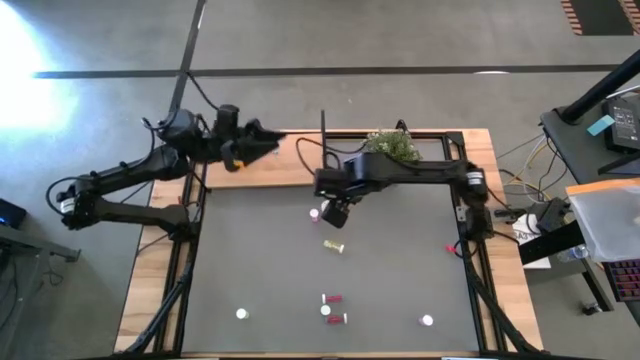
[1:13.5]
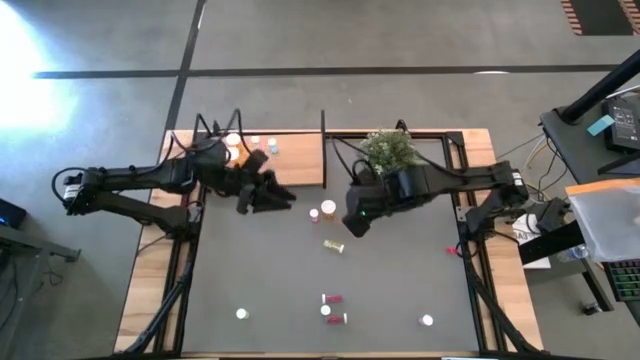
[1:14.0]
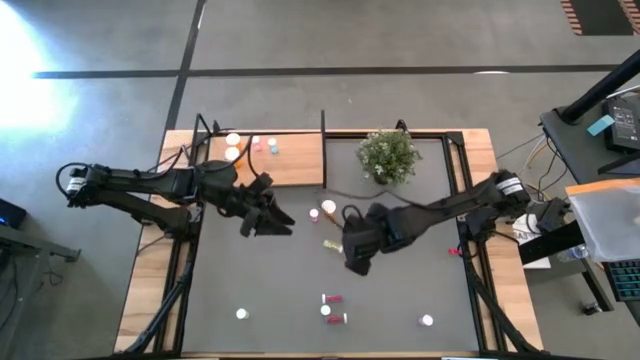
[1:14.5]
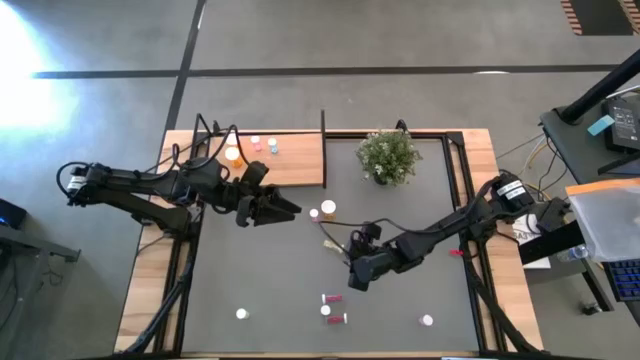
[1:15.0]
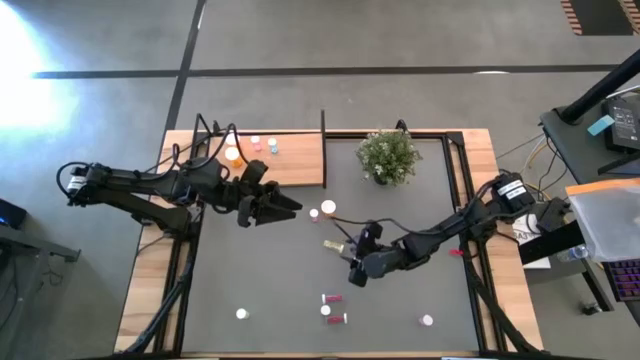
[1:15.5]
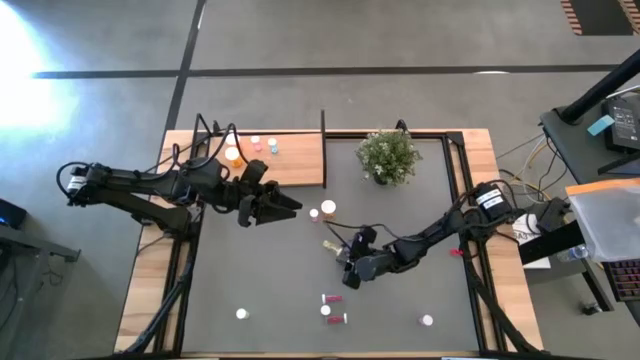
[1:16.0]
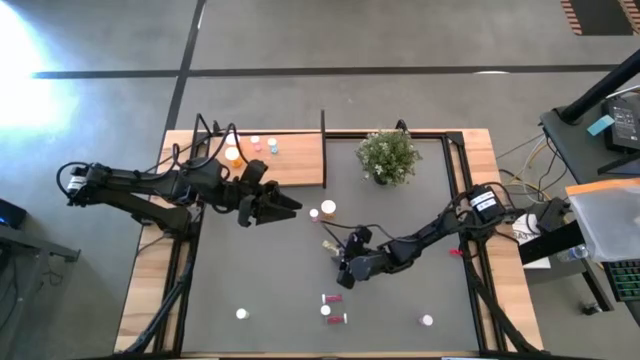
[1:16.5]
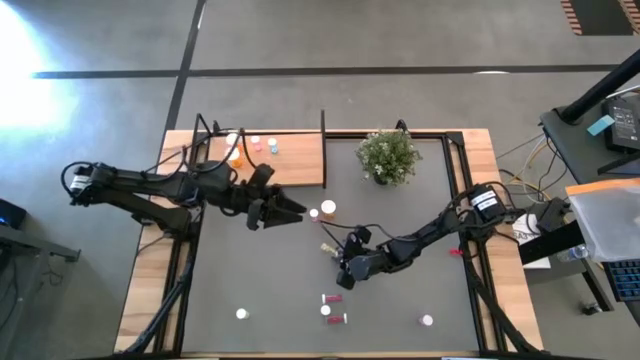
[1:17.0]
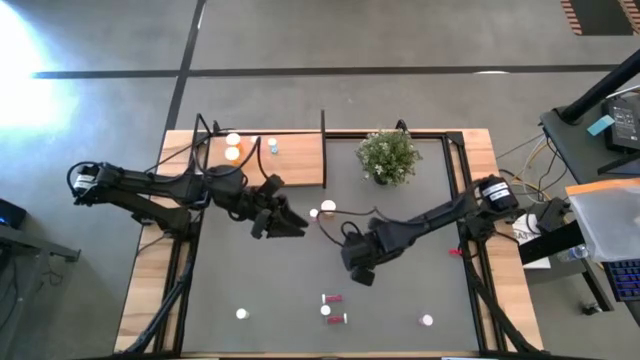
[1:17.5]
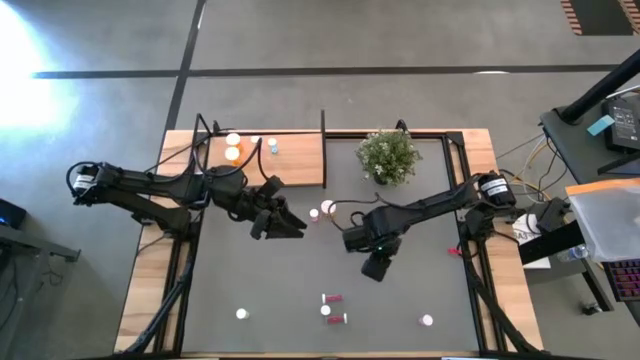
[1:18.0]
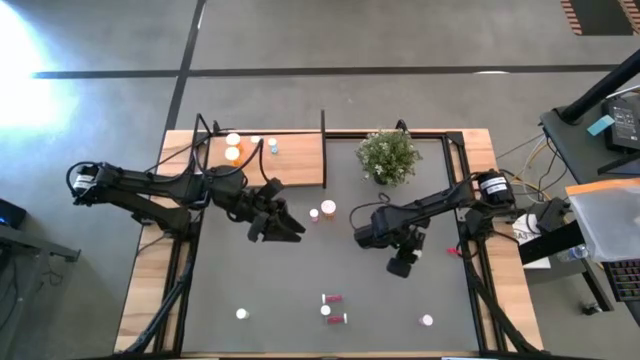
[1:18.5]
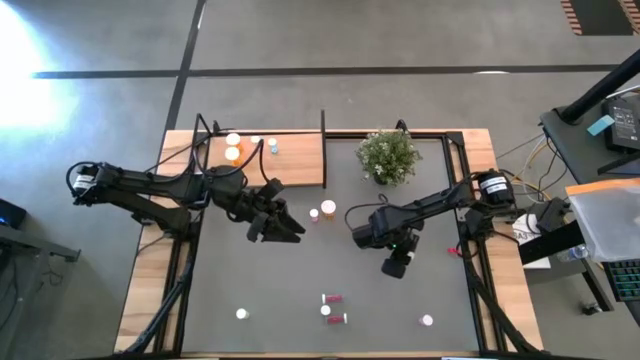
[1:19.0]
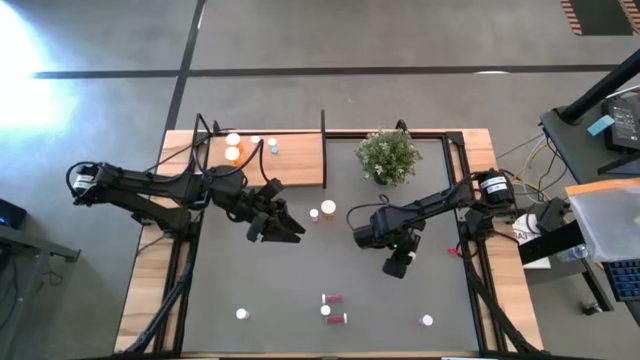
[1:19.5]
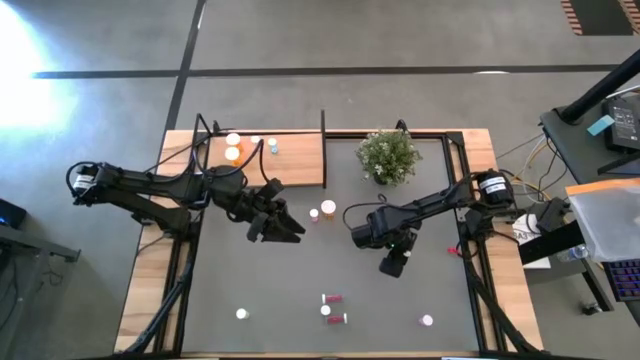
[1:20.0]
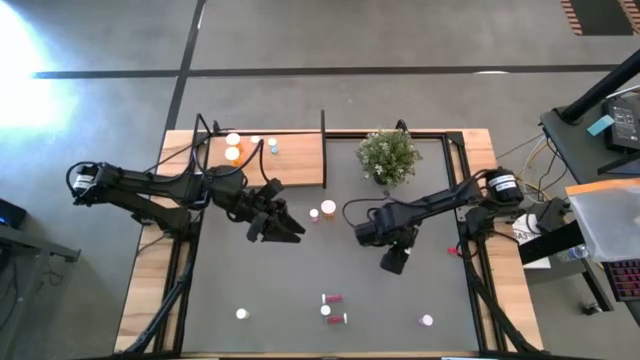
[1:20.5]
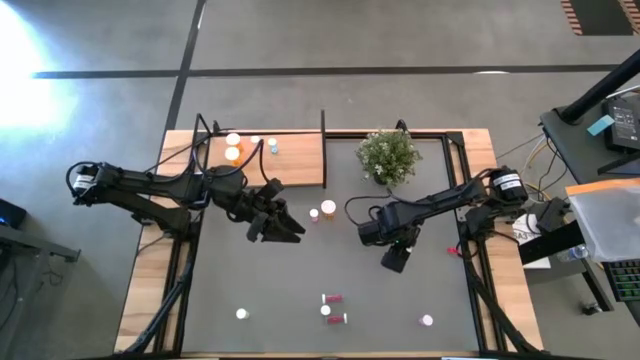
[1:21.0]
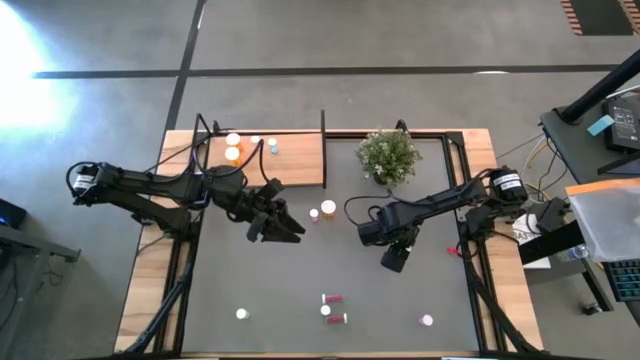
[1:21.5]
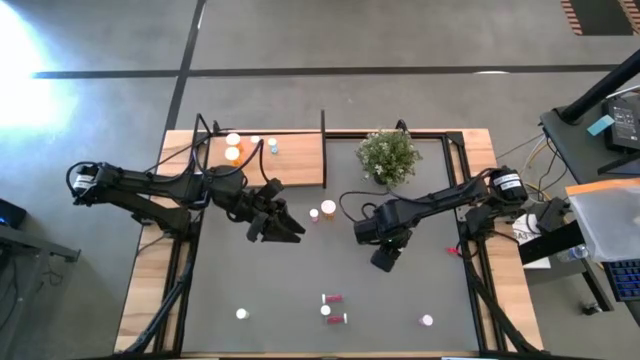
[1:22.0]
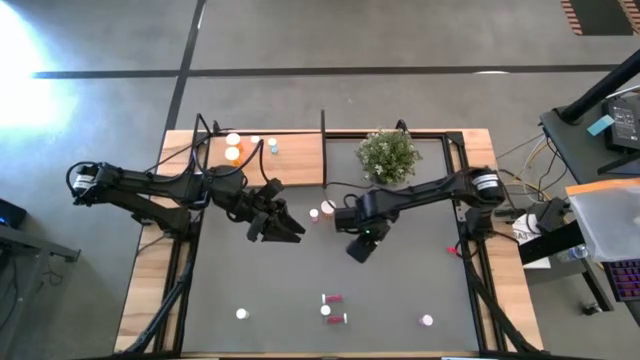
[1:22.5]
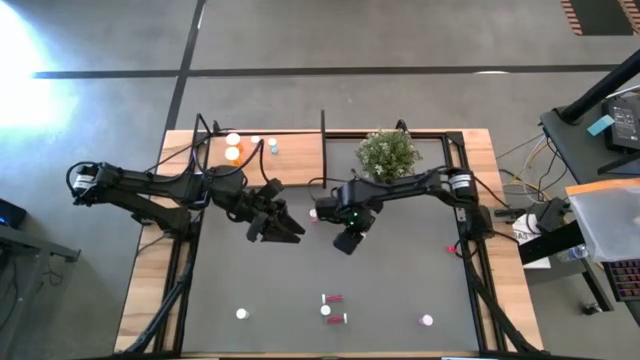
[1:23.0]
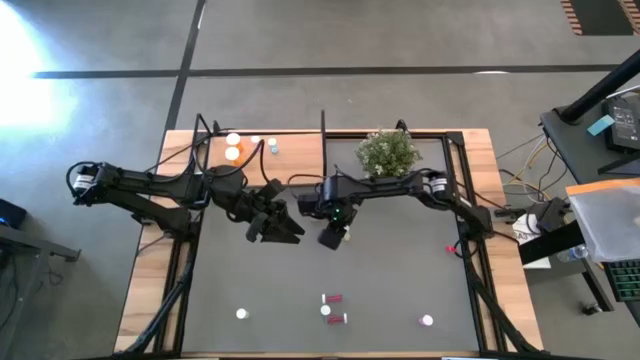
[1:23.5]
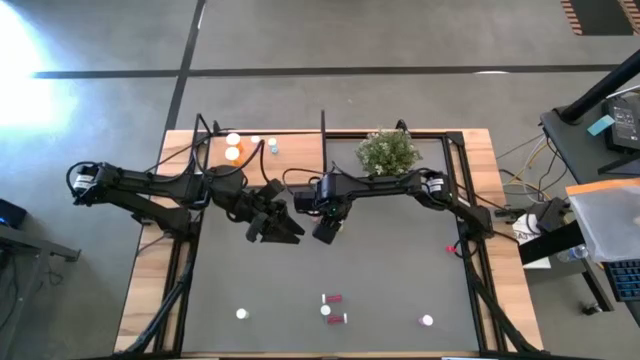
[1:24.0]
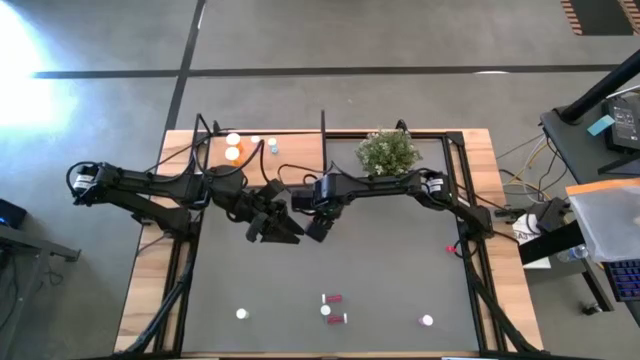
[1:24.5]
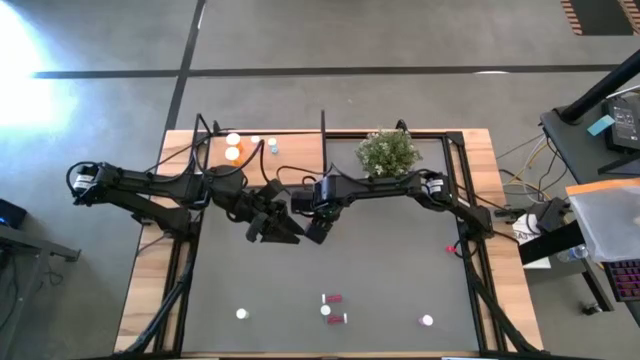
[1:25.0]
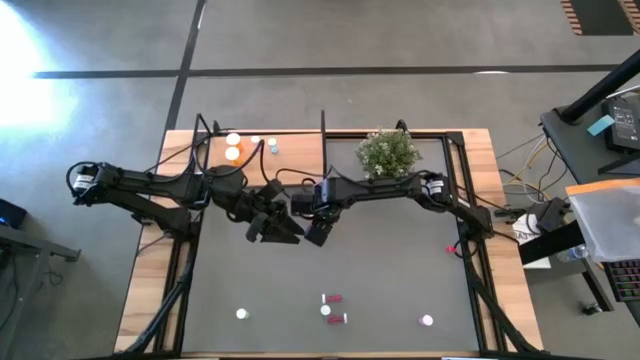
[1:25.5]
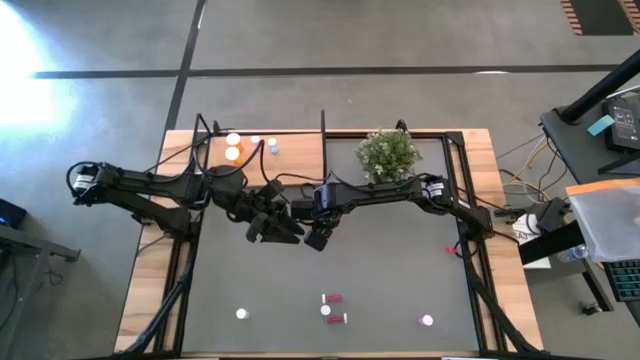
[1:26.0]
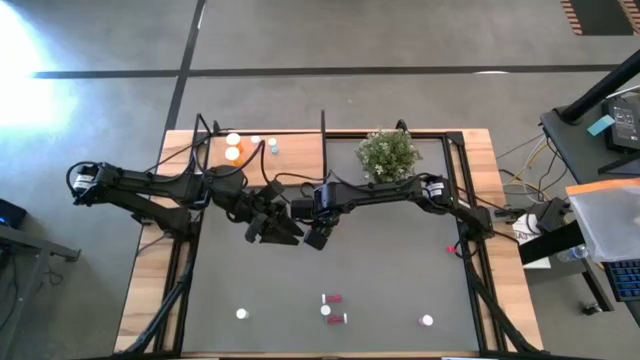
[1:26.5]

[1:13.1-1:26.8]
Task: Pick and place medicine bottles onto shelf by color
Move the top small yellow pill bottle to the center of the table

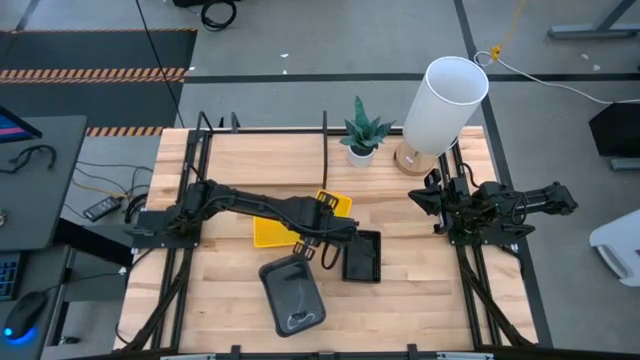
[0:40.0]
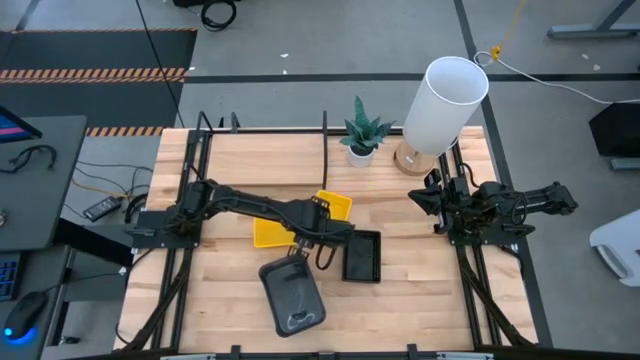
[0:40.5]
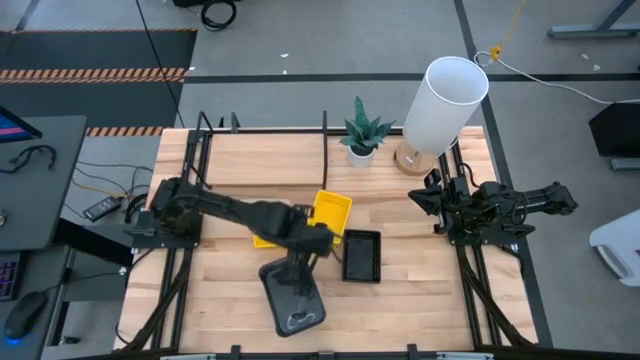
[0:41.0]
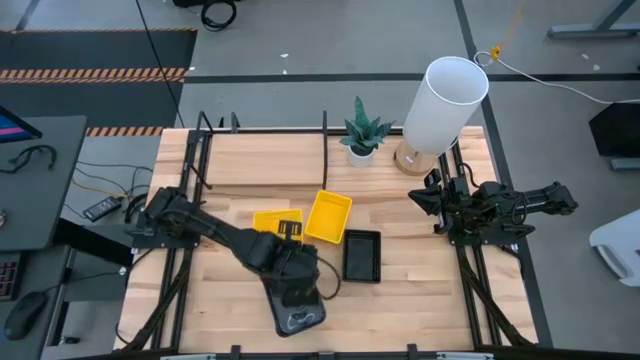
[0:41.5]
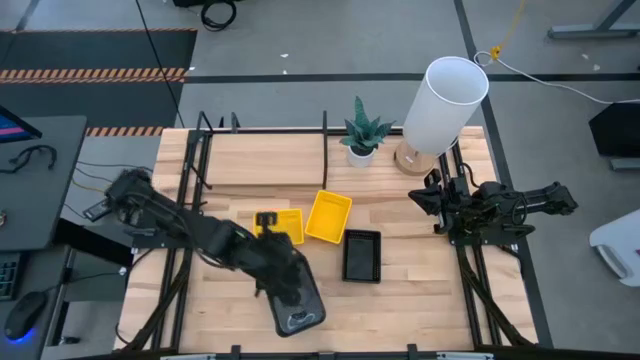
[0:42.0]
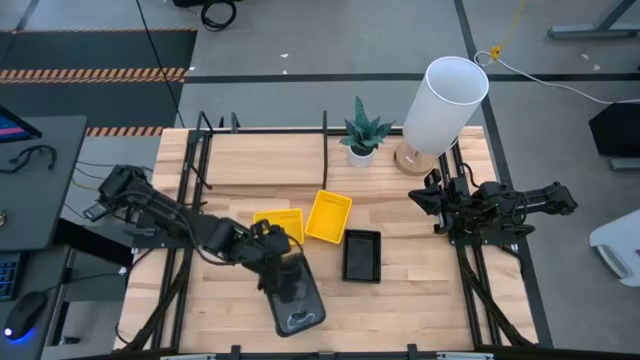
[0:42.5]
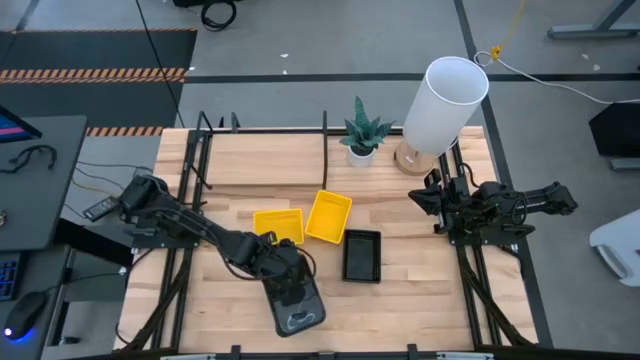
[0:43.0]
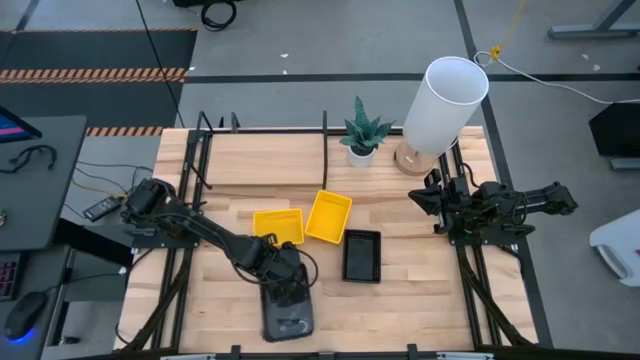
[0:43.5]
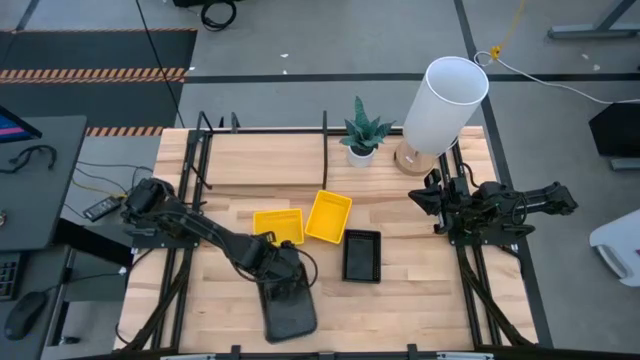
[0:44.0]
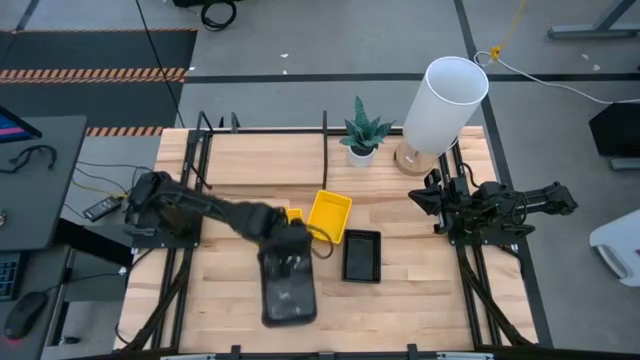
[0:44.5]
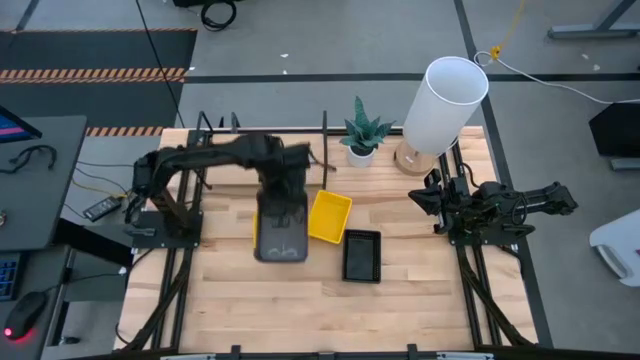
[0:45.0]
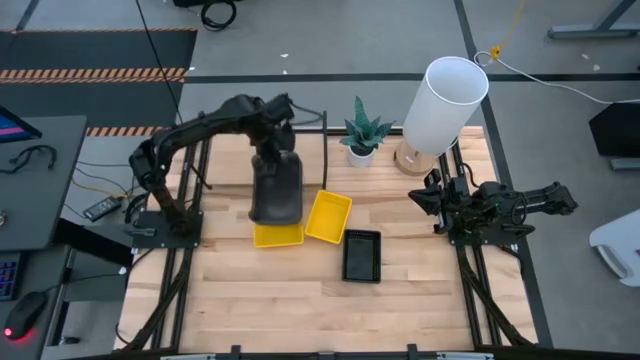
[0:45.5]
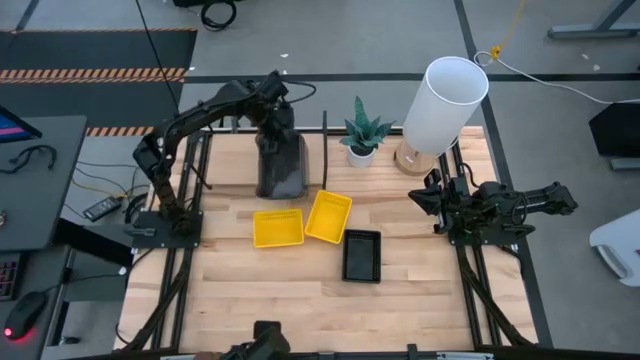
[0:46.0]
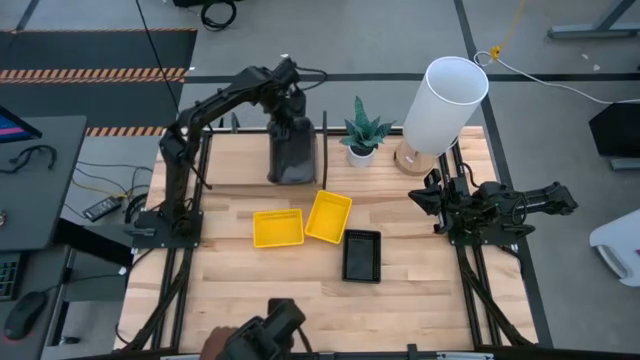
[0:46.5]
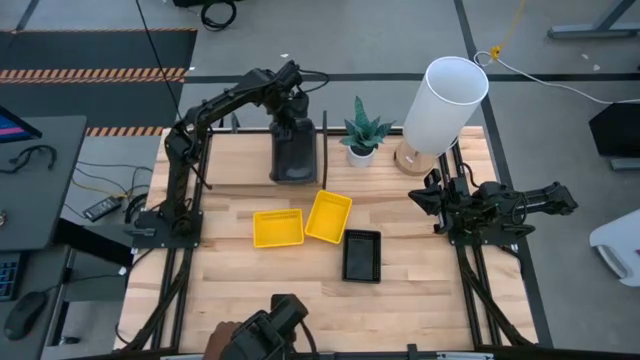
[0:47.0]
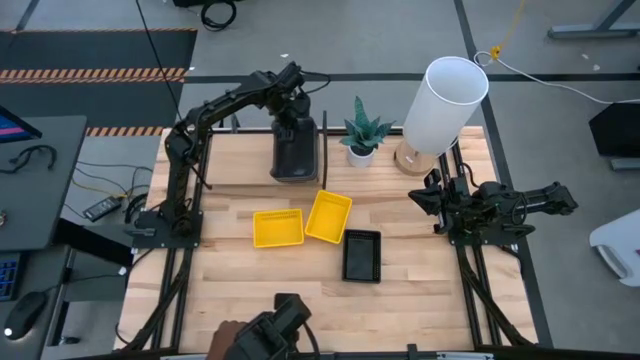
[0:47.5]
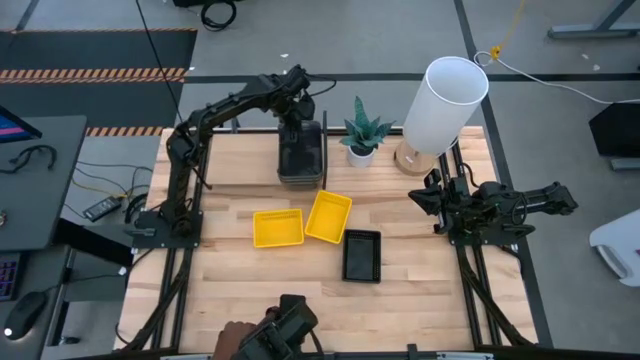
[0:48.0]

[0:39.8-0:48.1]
Task: Stack baskets on shelf by color
Put the stacked transparent black bins on the shelf
